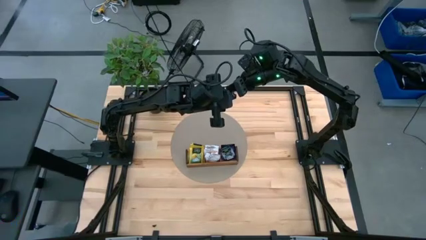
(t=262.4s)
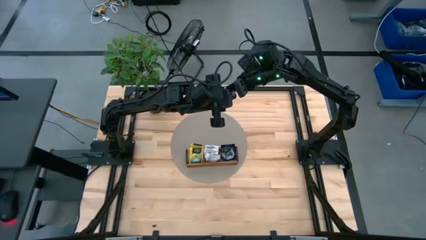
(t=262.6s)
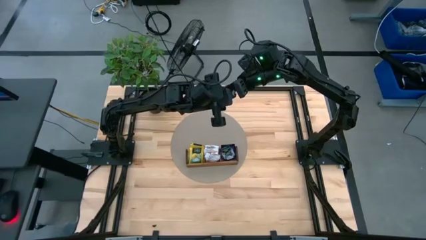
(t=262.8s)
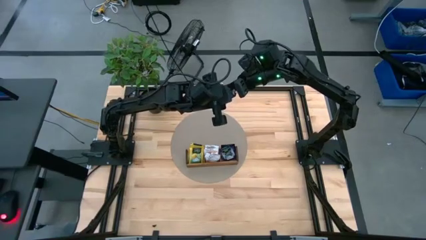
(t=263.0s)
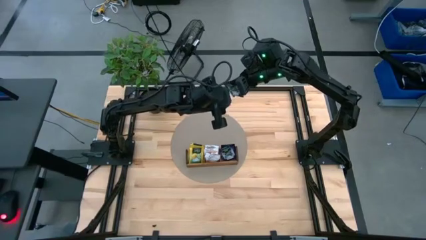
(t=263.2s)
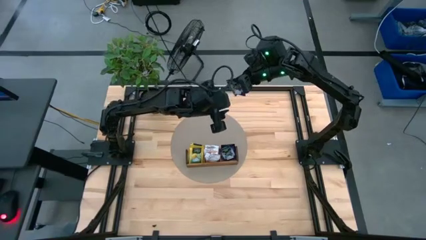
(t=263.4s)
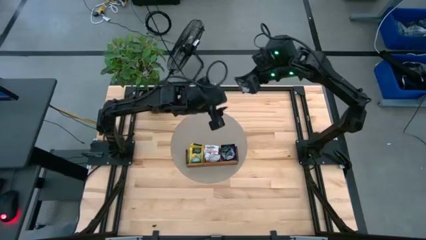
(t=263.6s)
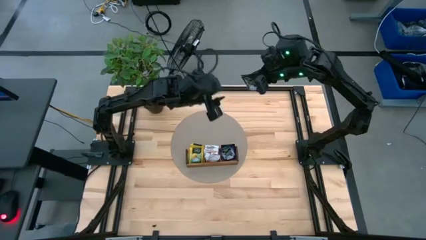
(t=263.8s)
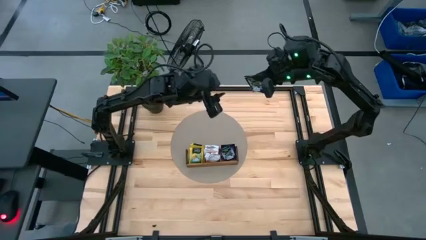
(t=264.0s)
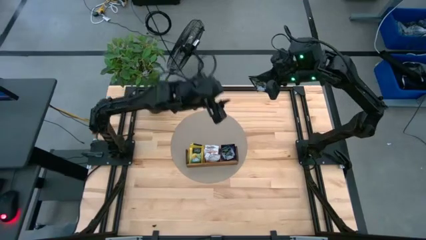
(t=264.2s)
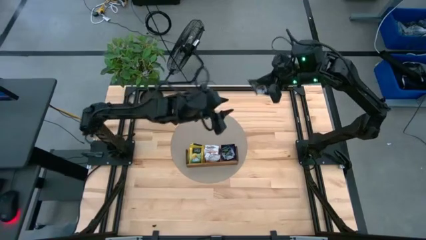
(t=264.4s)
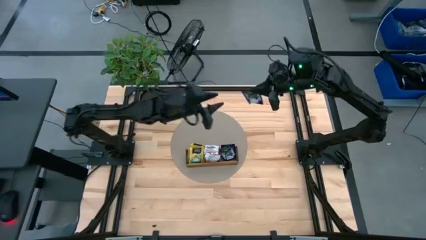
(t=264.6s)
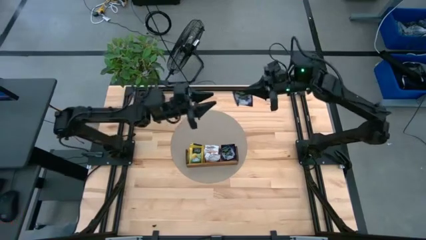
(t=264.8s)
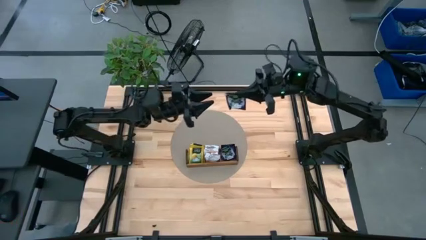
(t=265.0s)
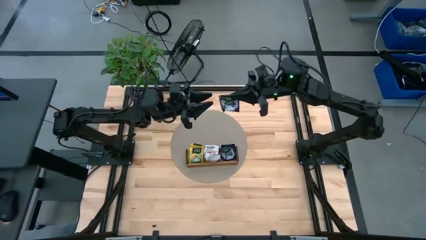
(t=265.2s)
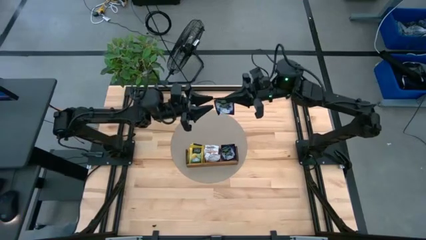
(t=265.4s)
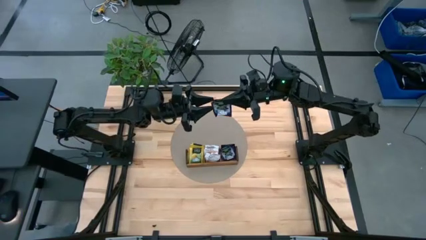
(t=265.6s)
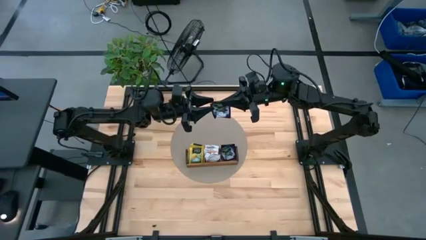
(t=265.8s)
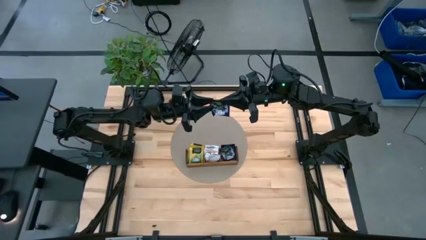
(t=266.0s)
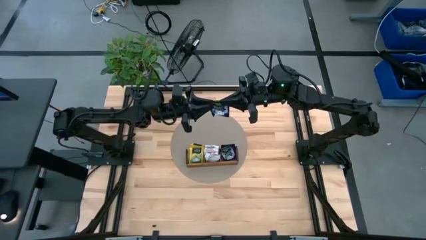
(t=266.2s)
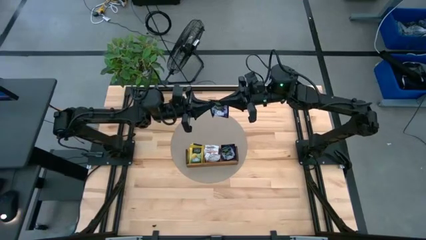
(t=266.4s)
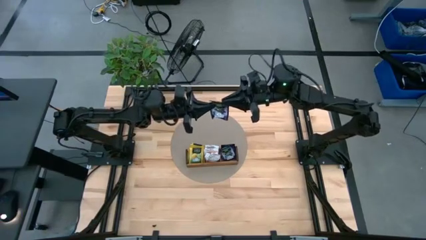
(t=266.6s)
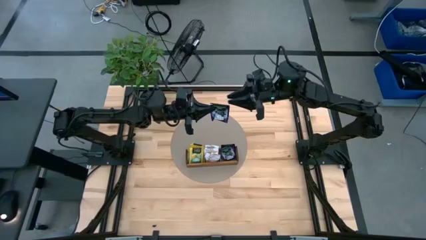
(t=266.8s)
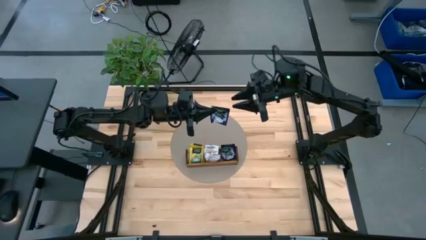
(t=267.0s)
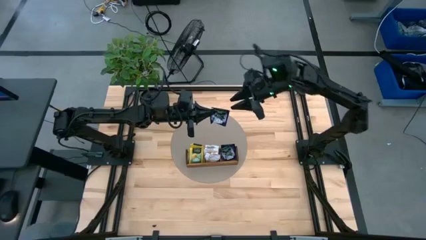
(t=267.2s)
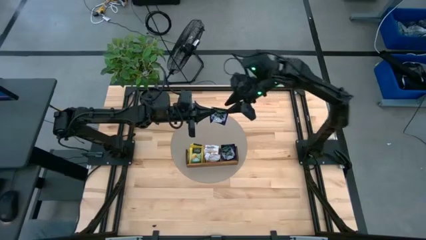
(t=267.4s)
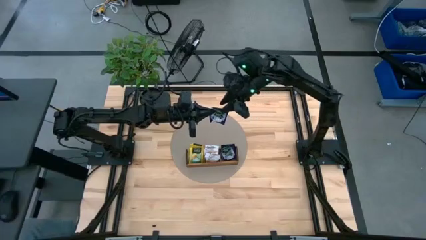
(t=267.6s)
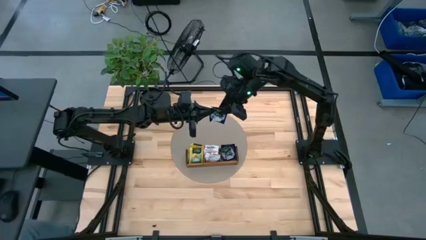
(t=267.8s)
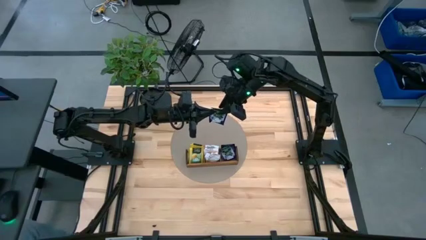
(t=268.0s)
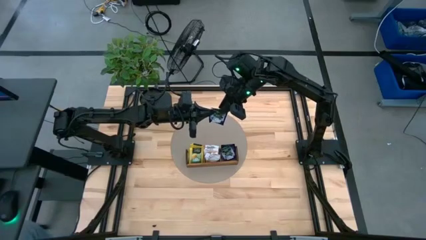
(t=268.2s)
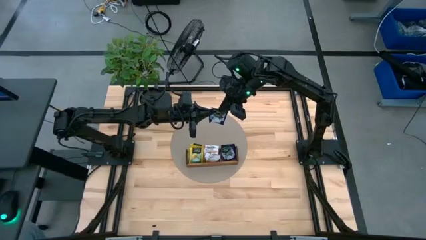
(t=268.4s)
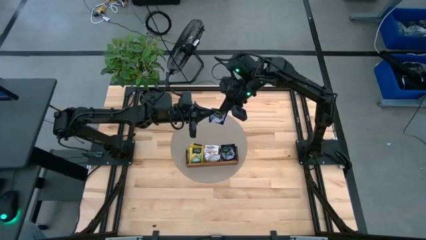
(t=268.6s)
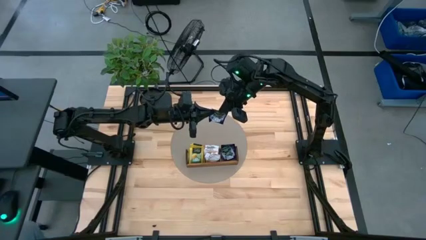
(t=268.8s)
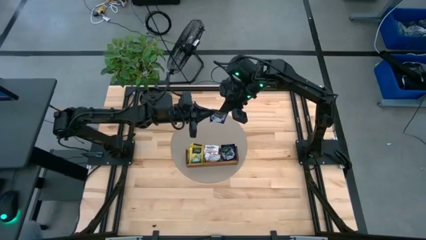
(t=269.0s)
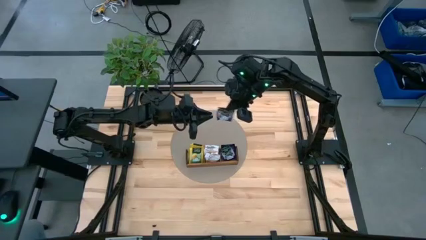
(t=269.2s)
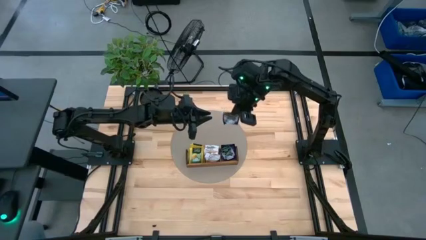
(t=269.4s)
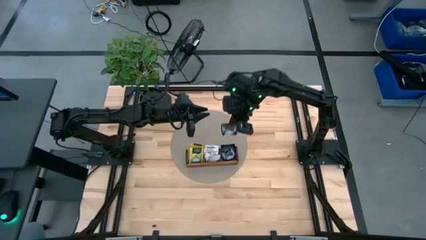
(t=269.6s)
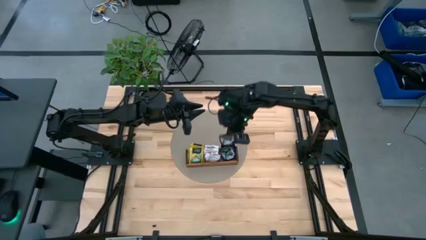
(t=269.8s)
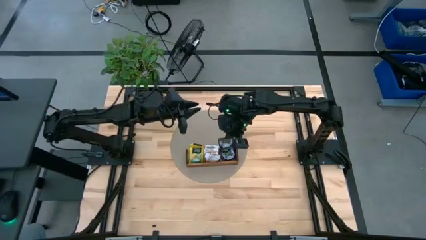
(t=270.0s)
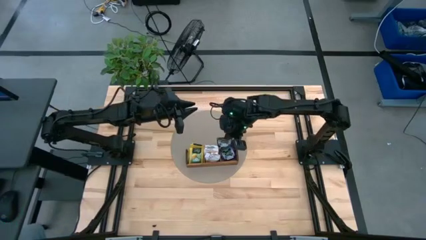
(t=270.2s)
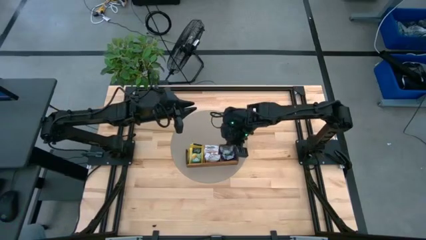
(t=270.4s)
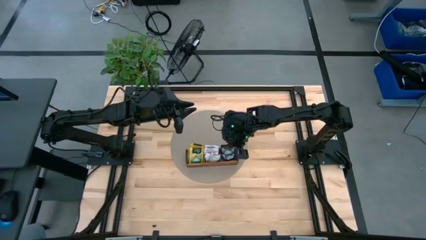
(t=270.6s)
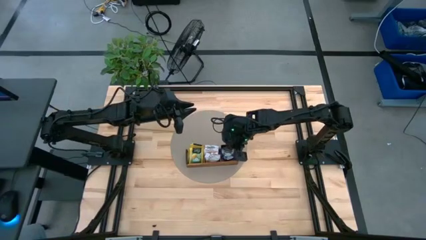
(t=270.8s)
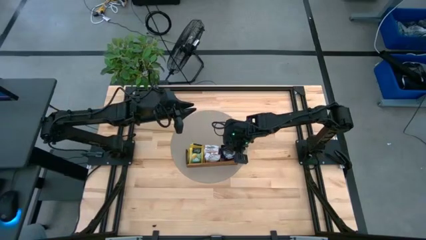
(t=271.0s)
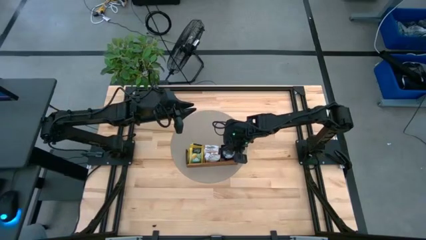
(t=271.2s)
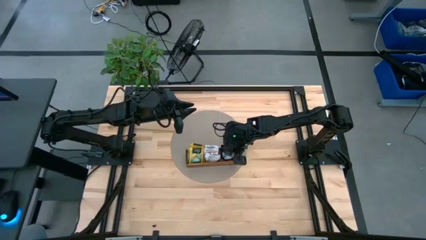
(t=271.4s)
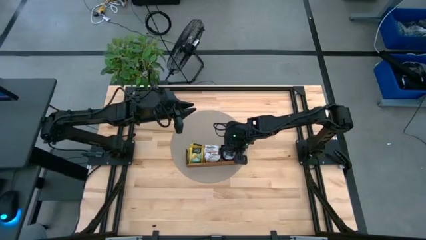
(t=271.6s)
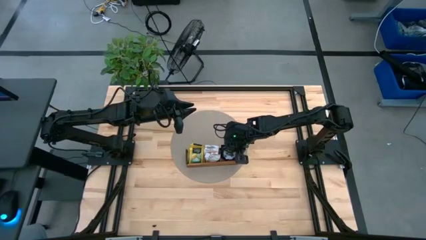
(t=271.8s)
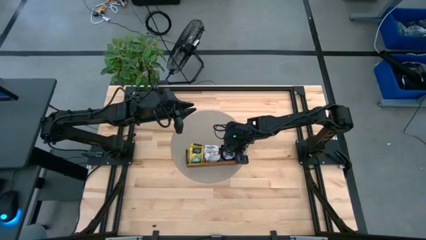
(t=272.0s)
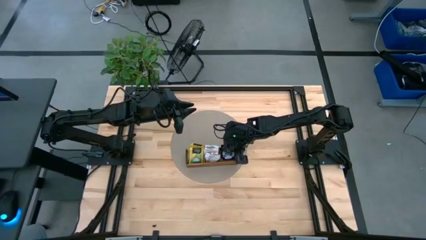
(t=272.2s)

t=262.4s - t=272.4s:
Task: Pick & Place Tea
Put the violet tea bag into the right section of the wooden organizer

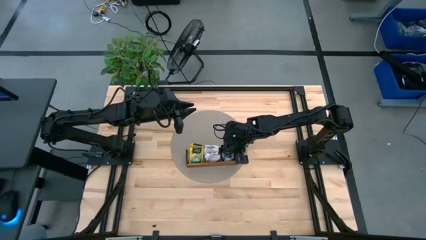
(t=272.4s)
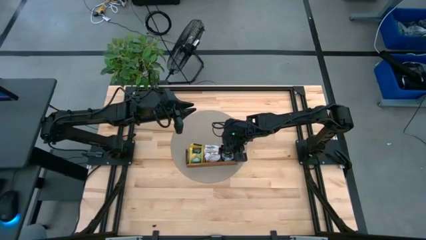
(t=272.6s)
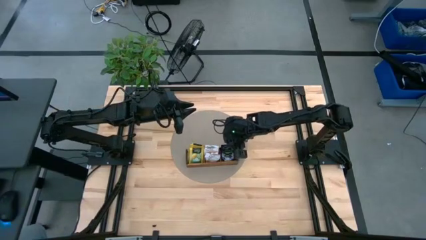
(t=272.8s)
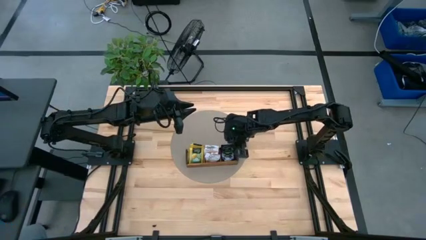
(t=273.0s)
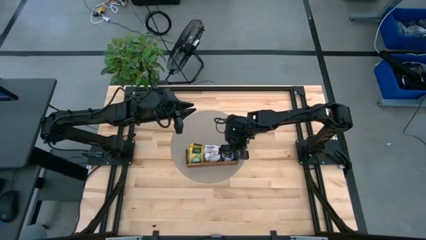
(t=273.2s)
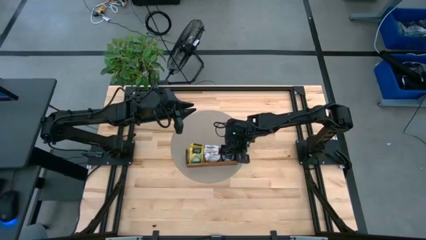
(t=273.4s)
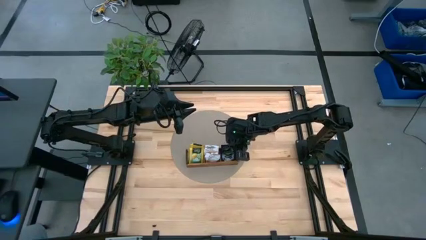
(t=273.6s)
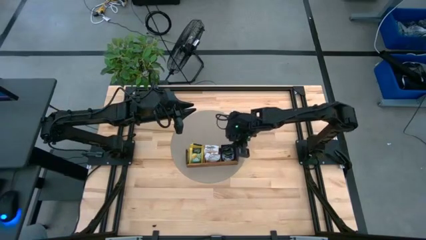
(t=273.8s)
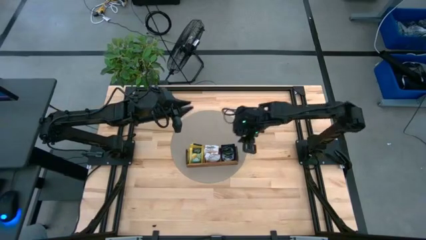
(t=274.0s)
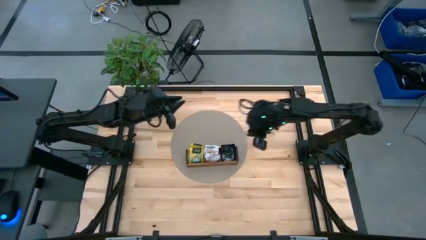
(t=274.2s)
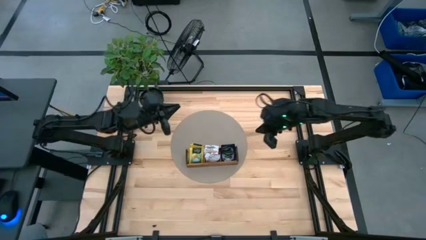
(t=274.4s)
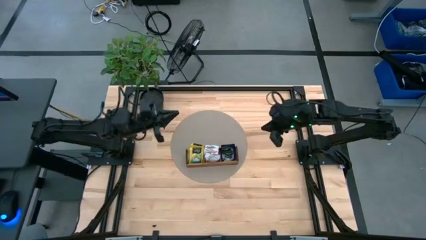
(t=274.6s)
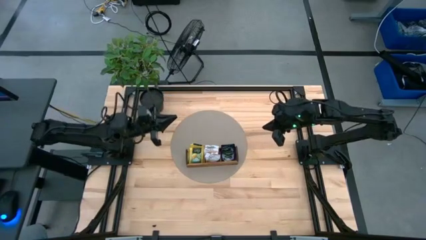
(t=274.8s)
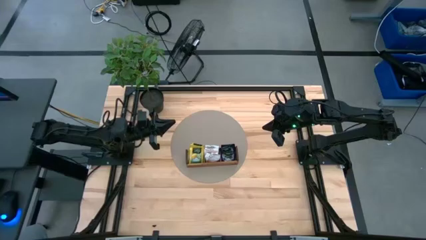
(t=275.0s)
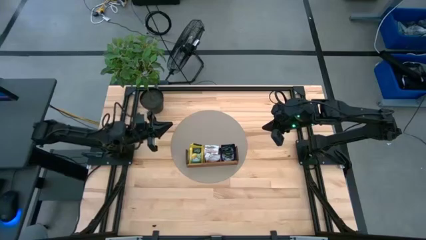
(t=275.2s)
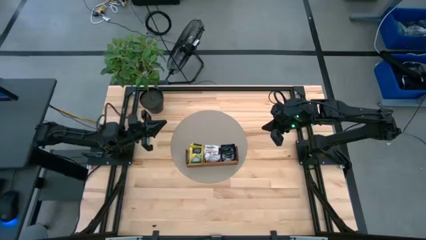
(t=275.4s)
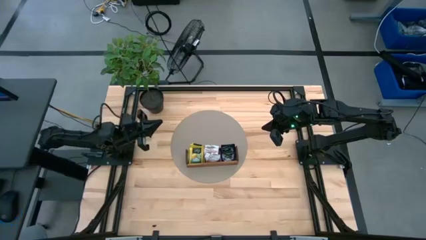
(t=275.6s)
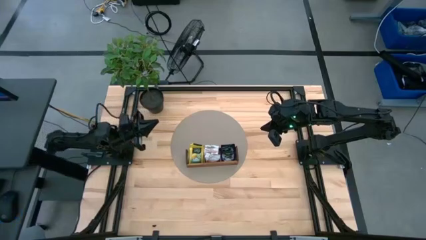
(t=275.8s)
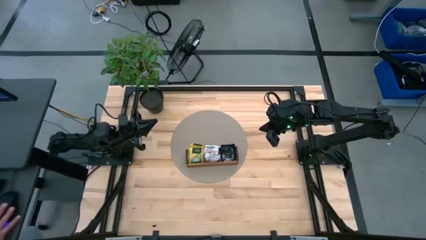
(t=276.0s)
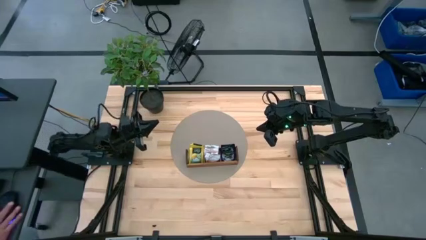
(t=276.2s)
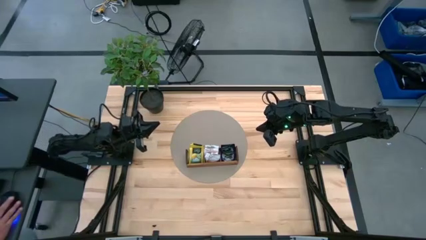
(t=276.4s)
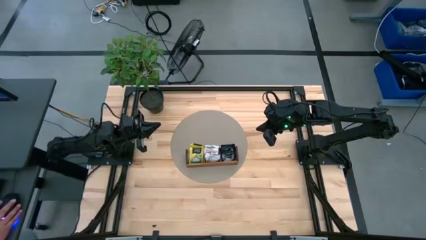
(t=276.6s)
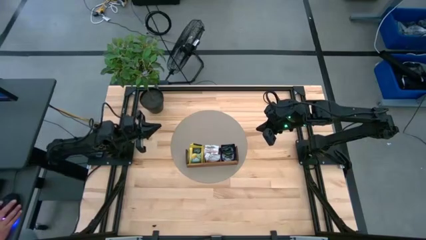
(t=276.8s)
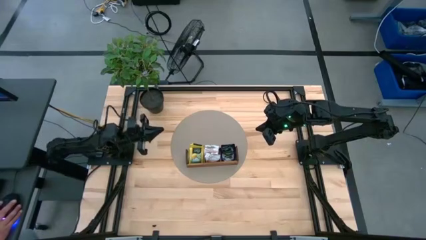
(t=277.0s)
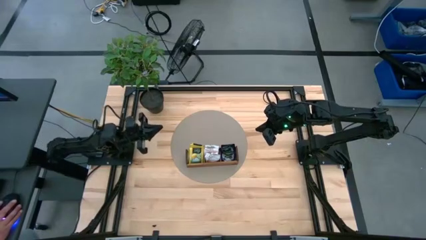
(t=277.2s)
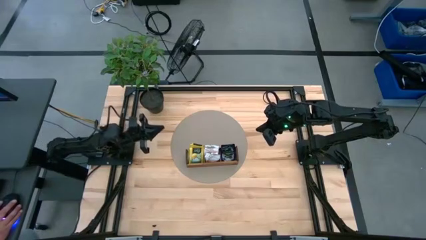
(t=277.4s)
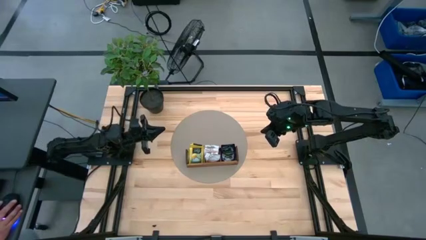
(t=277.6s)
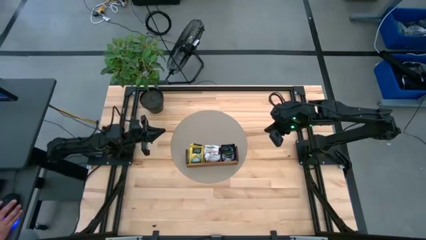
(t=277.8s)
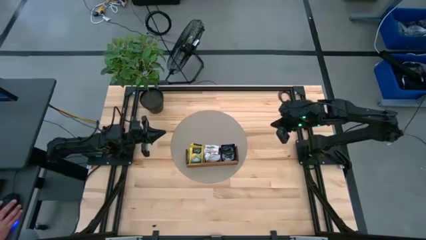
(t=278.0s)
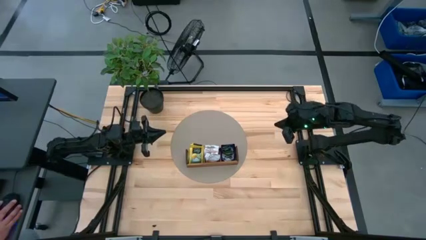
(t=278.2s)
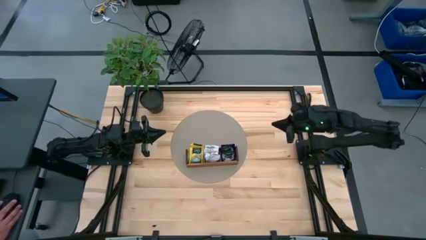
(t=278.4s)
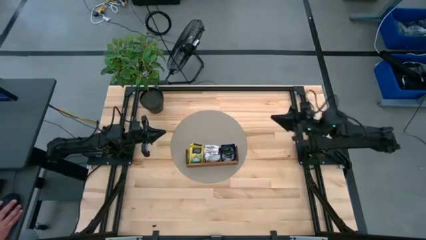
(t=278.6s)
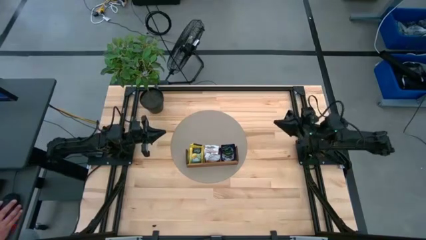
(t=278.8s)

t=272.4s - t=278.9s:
Return to Home Position
